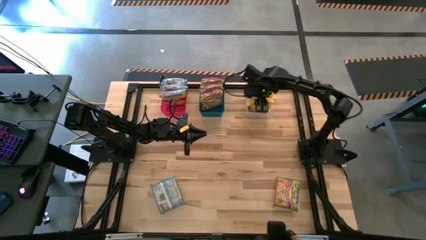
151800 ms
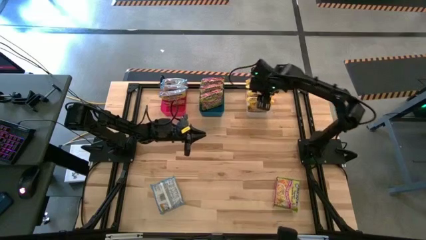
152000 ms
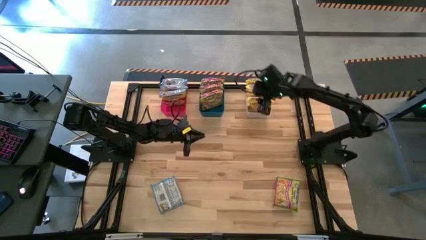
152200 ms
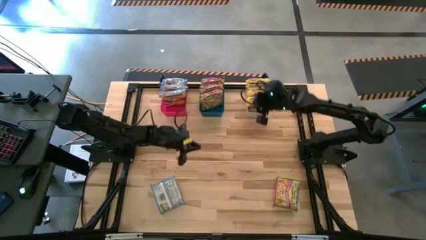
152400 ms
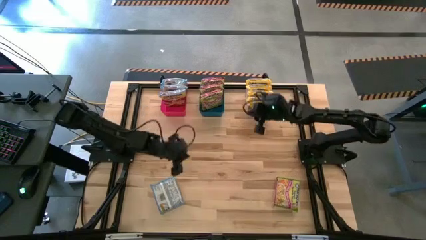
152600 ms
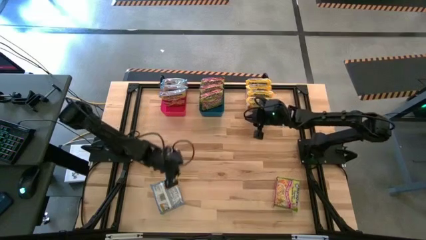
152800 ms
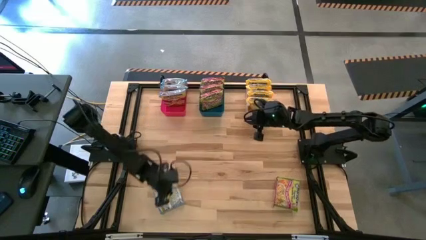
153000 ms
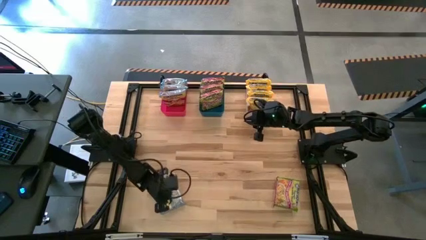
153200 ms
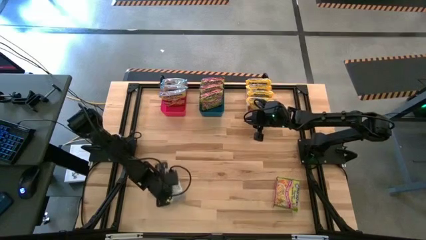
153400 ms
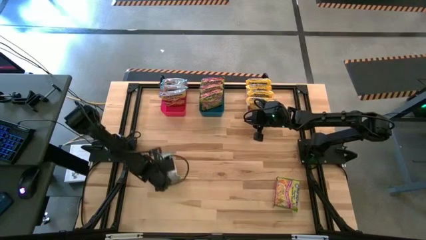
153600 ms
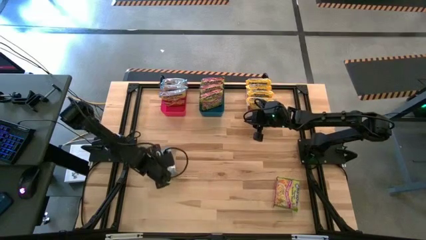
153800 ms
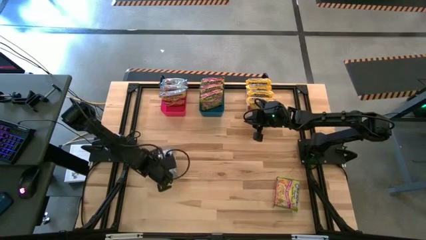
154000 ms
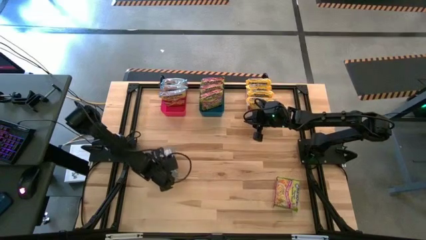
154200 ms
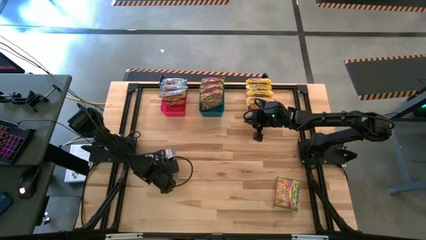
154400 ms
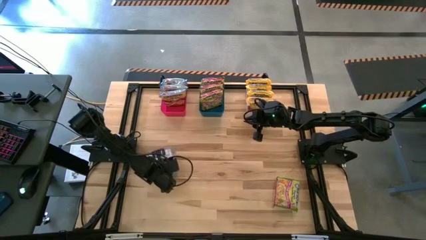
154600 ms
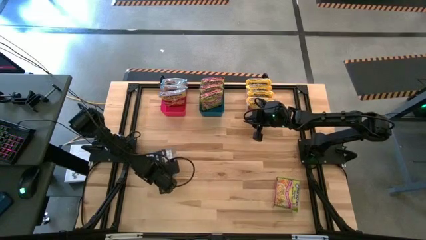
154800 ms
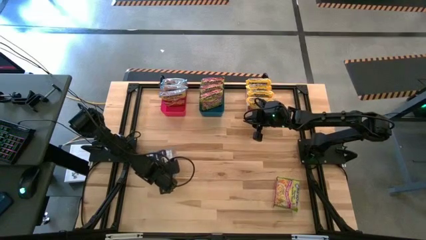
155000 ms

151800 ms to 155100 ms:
Task: Sort Maruchan noodles
Put the blue noodle pack into the red bin

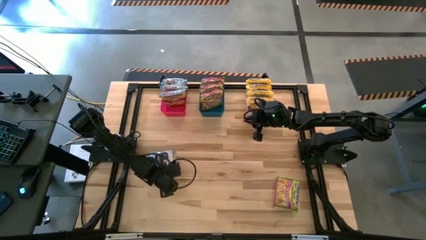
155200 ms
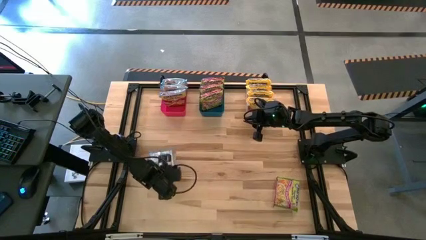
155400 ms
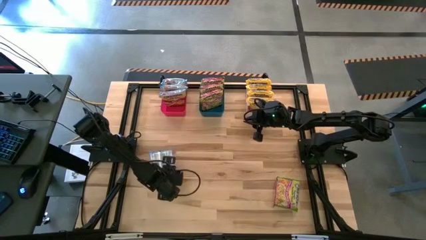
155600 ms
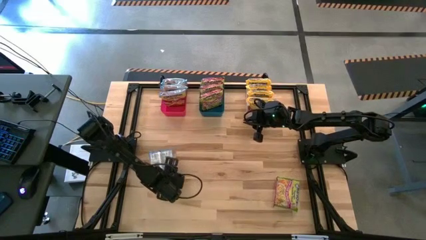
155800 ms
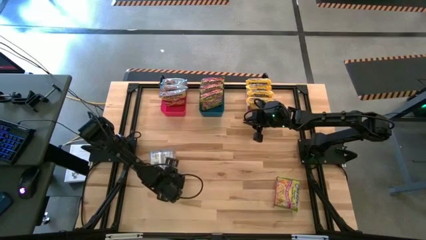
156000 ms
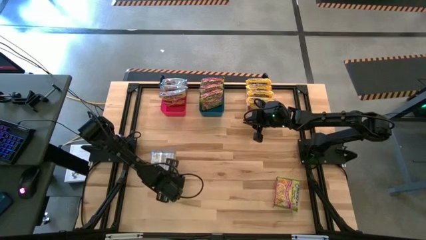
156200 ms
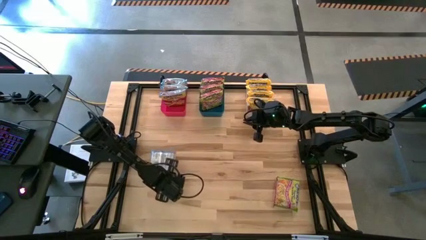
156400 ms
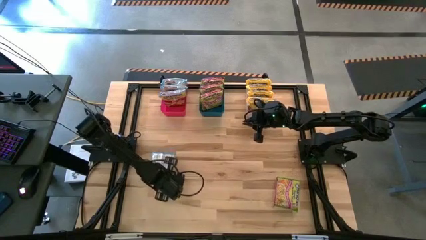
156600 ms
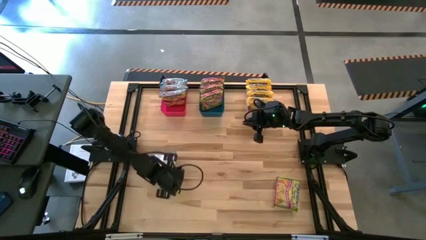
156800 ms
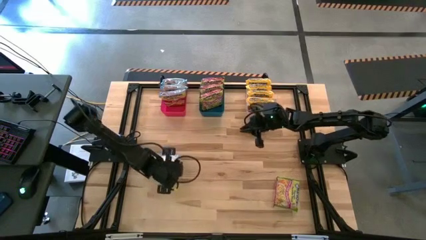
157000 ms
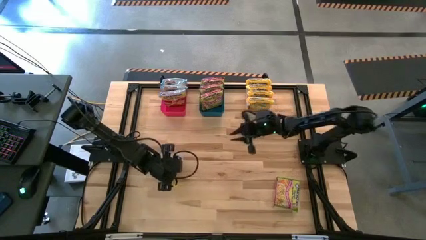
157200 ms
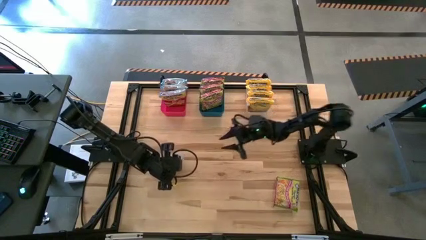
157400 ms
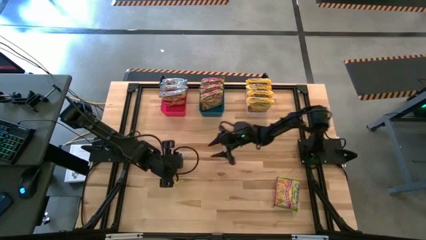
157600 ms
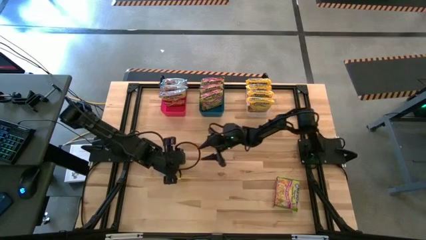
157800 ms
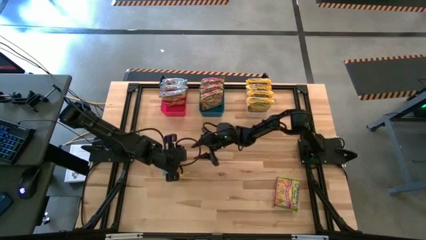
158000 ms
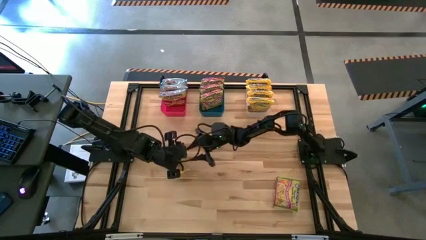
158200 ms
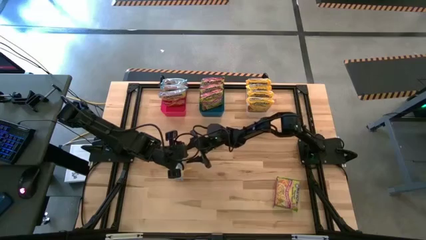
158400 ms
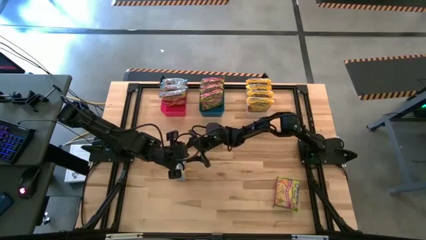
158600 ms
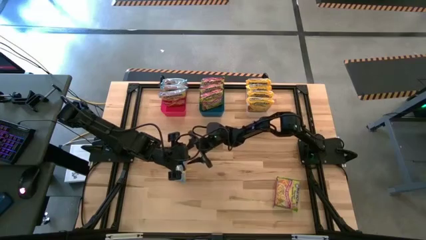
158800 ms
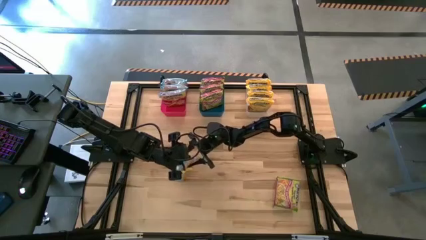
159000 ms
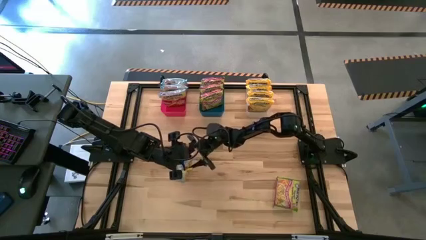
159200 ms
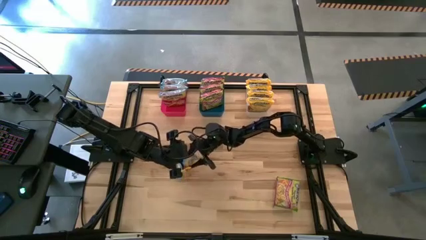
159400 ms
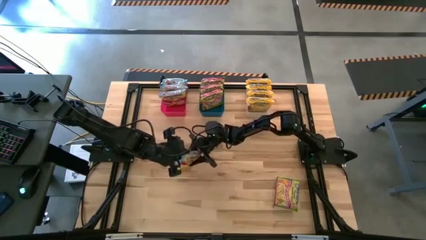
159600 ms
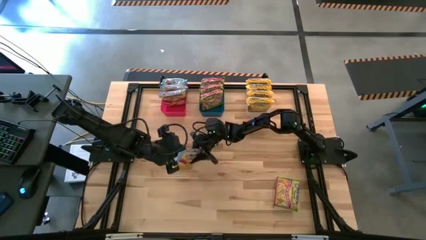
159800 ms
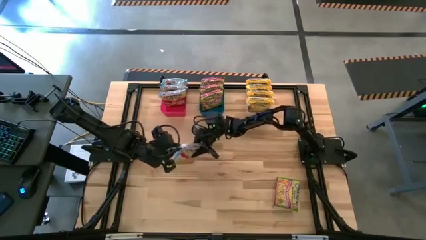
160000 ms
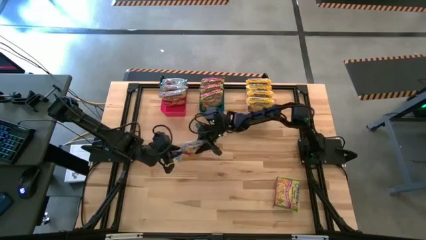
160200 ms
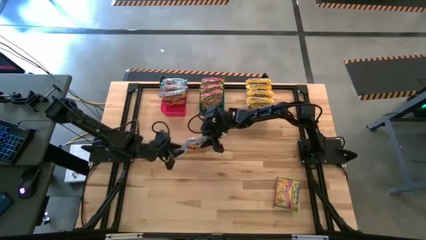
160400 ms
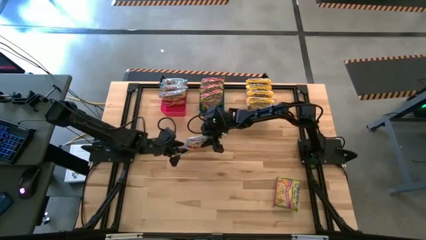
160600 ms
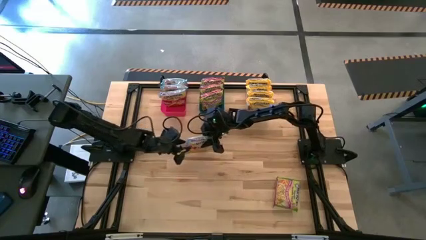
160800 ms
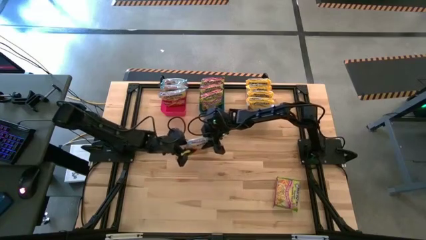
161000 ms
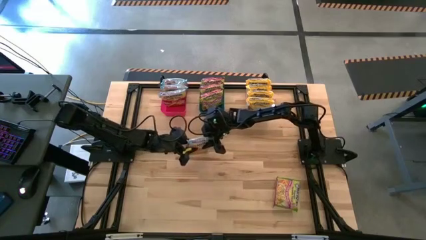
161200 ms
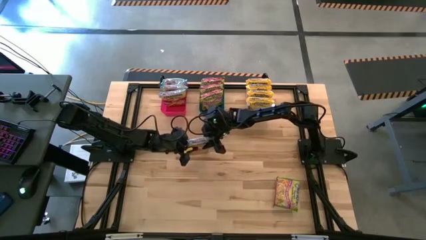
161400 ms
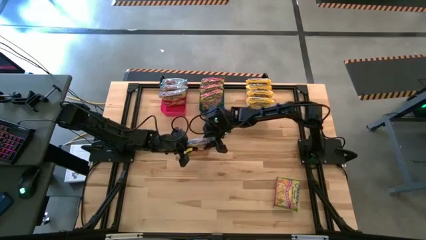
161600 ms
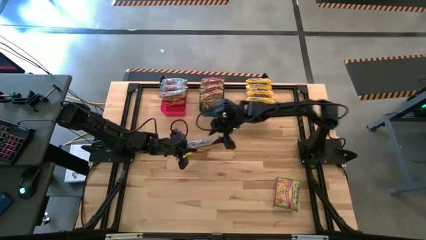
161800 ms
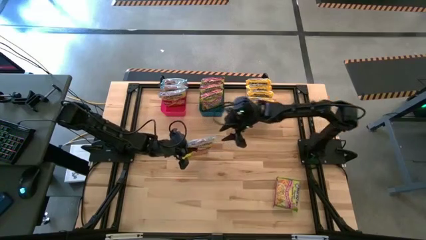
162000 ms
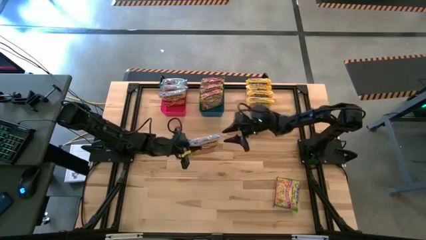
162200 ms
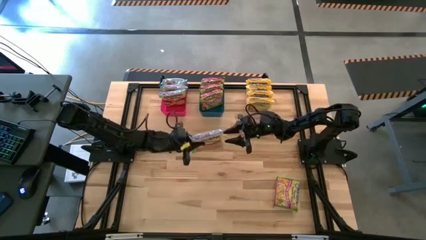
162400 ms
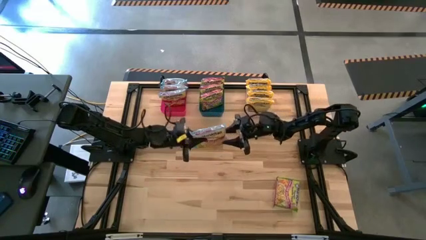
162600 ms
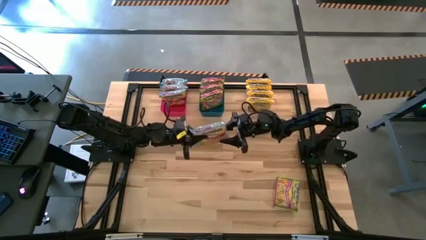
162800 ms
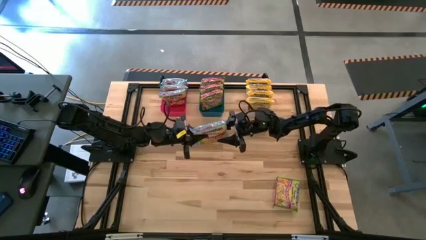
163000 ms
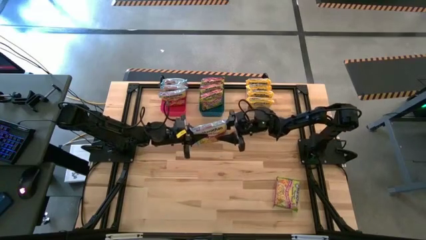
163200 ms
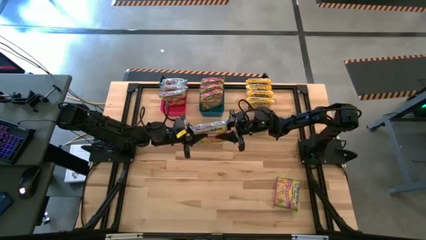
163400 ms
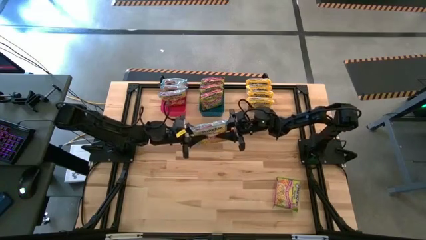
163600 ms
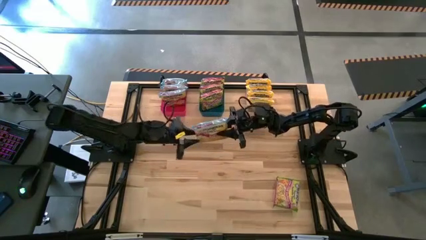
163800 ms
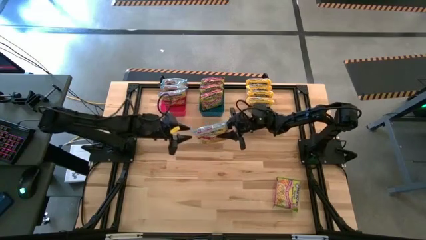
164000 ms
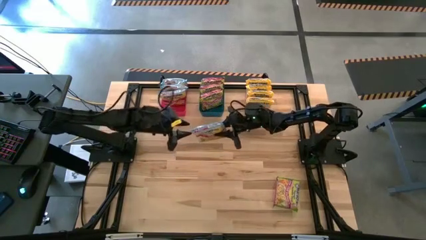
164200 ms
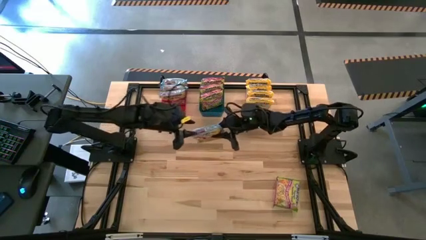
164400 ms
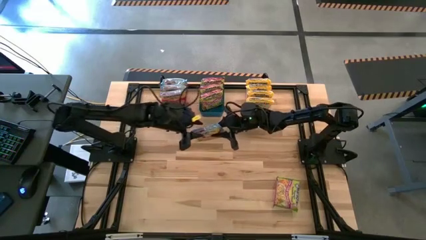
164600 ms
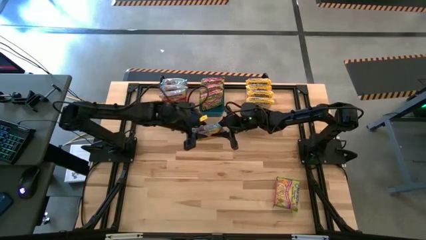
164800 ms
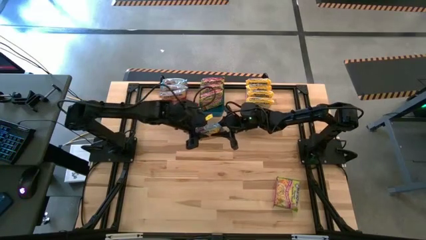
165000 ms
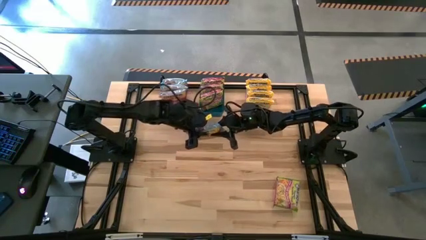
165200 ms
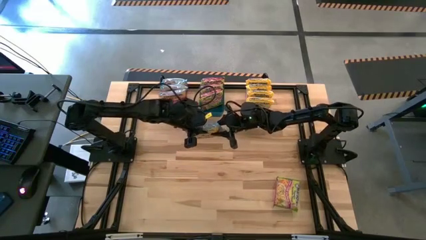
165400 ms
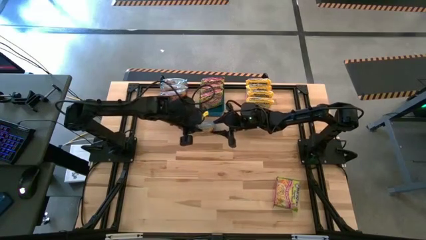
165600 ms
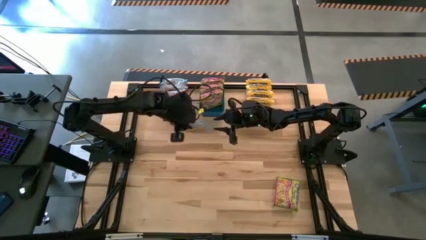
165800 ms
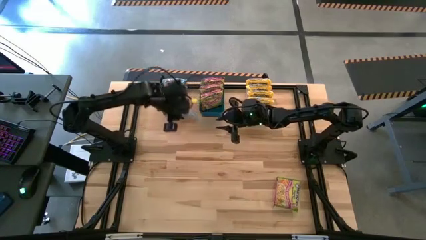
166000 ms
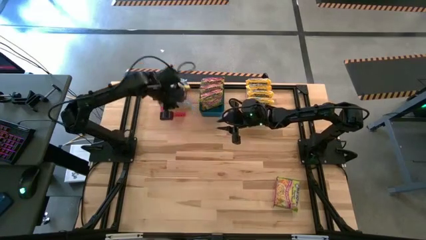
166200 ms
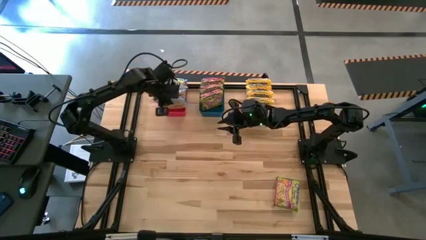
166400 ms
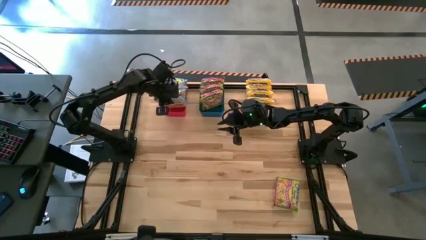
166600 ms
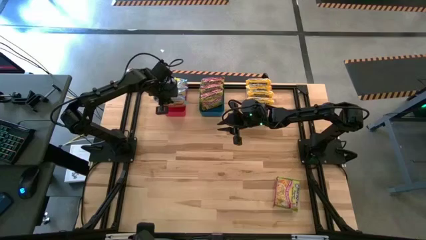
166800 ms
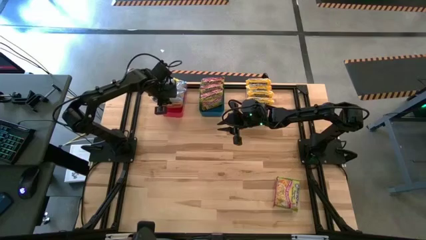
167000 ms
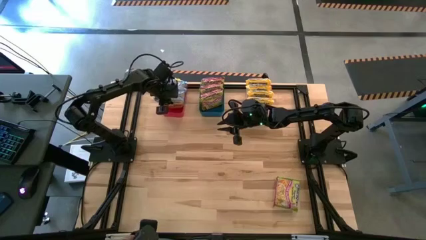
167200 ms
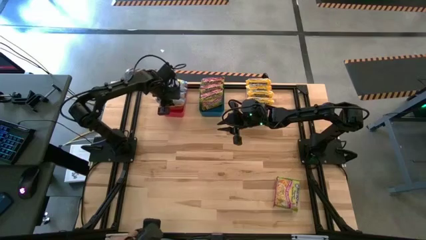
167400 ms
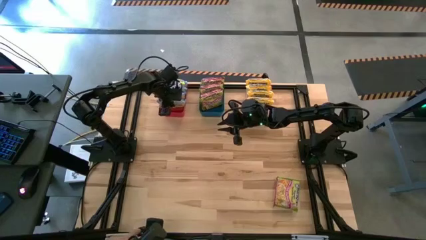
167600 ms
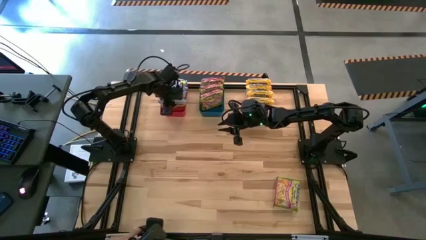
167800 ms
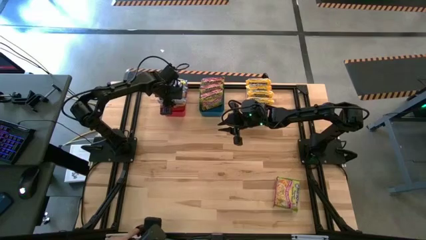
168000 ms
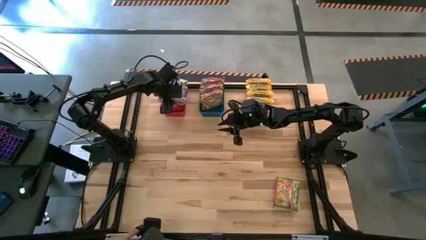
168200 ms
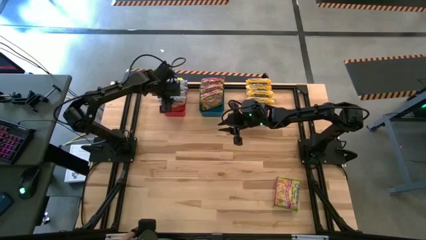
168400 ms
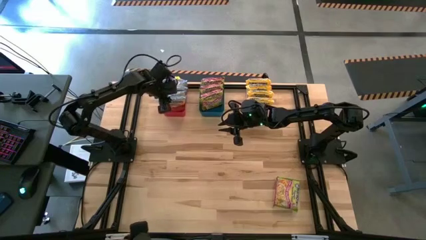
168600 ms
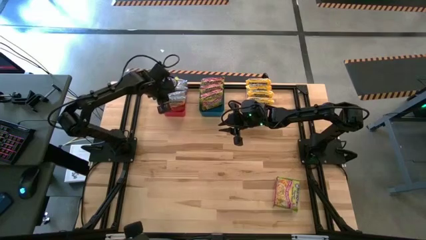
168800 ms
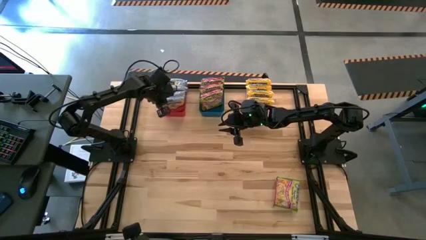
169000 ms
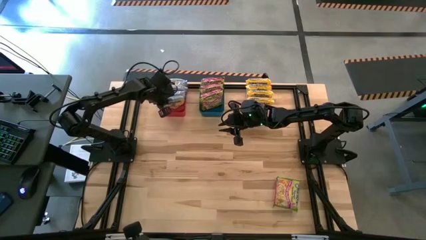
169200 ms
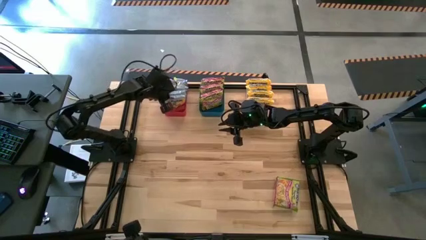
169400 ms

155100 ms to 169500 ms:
Put the blue noodle pack into the red bin
